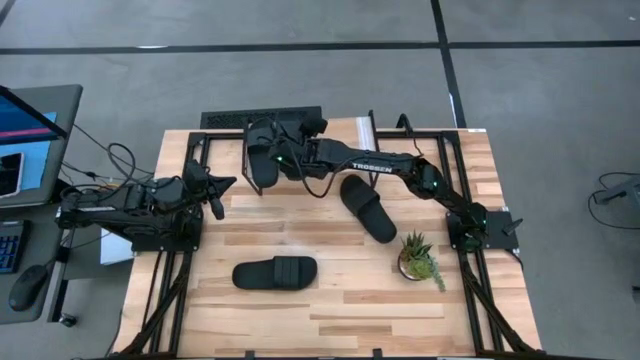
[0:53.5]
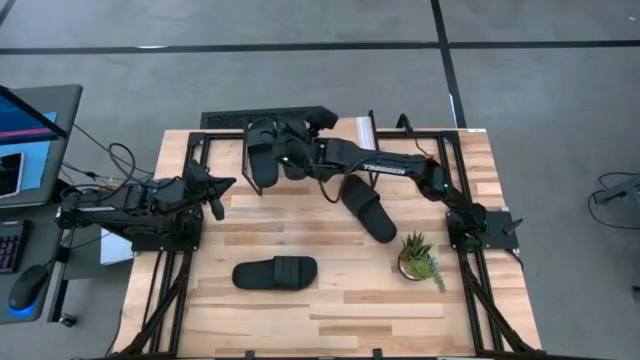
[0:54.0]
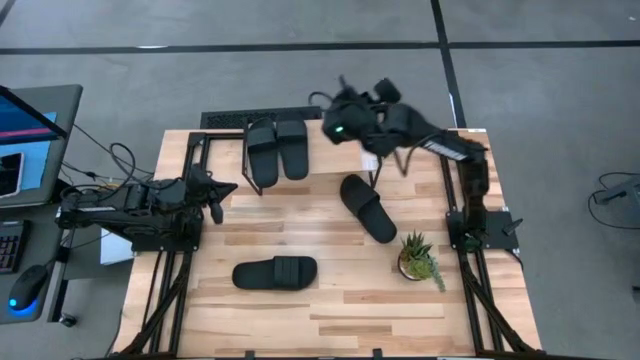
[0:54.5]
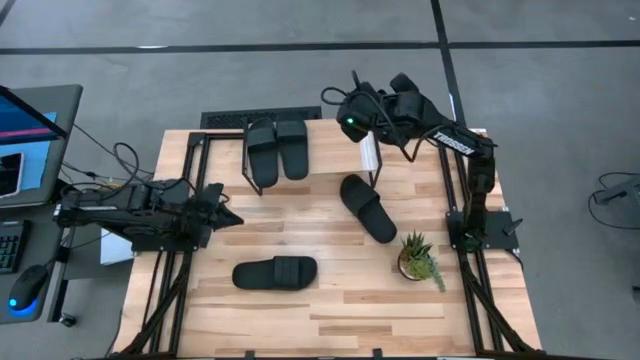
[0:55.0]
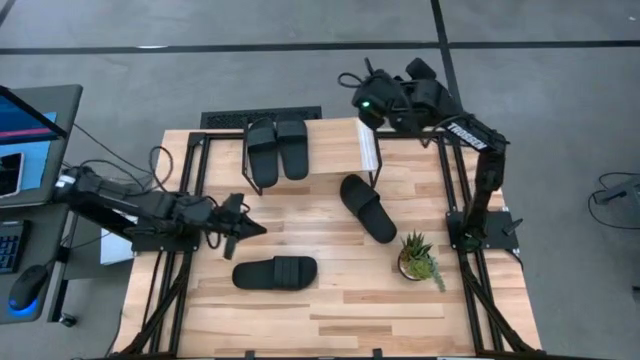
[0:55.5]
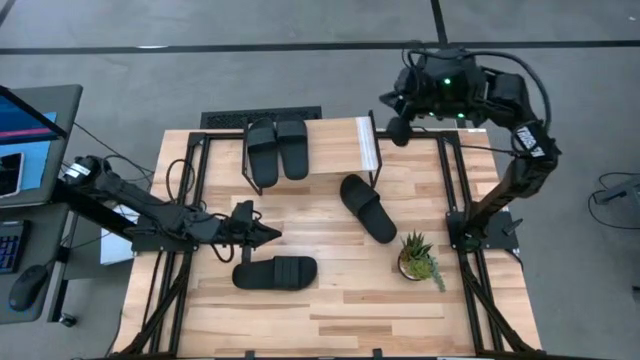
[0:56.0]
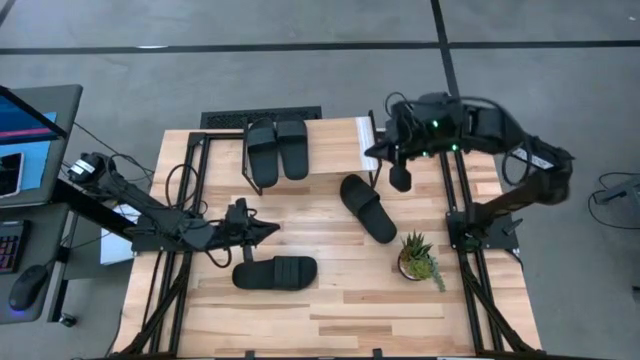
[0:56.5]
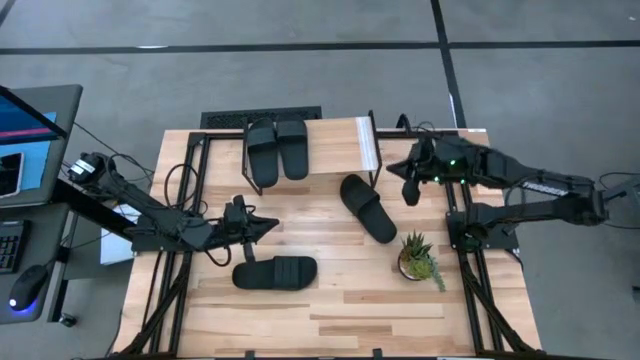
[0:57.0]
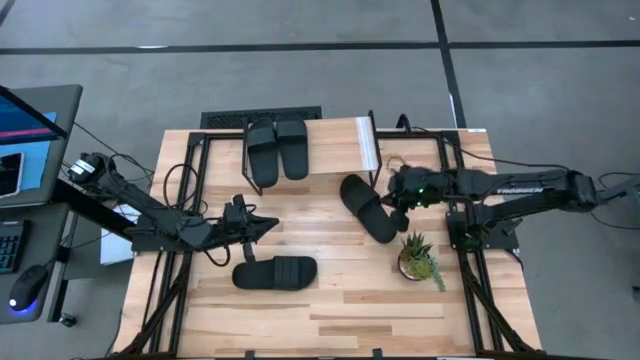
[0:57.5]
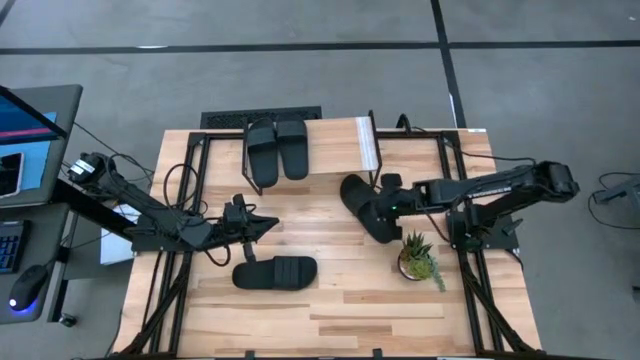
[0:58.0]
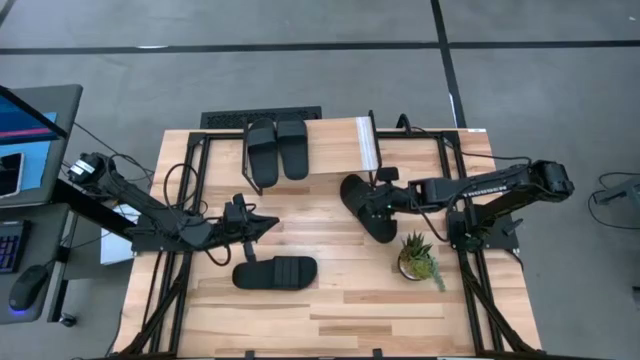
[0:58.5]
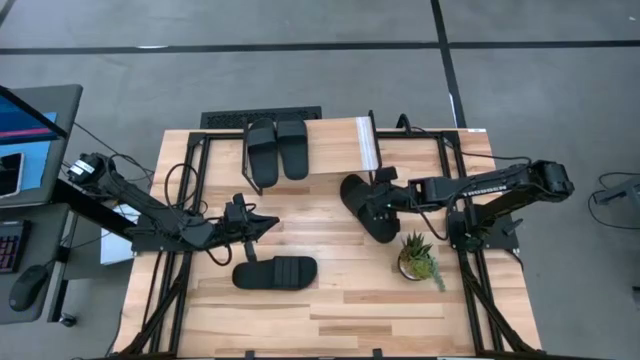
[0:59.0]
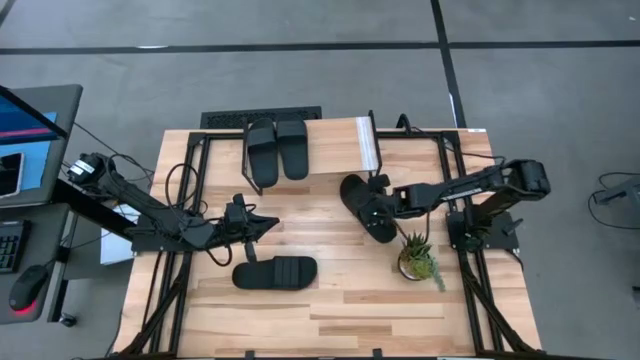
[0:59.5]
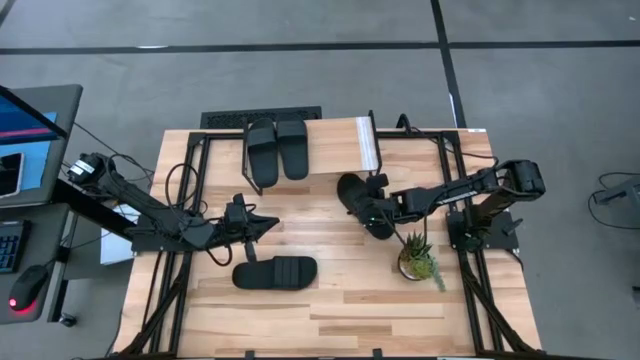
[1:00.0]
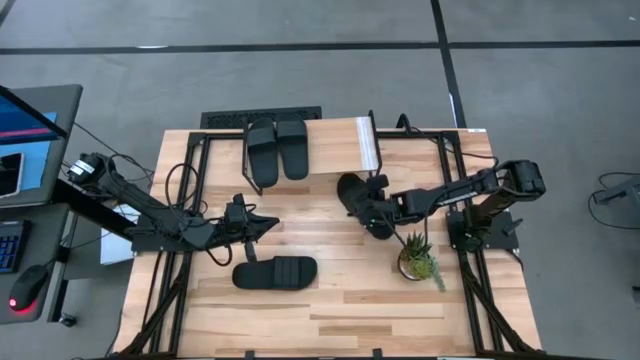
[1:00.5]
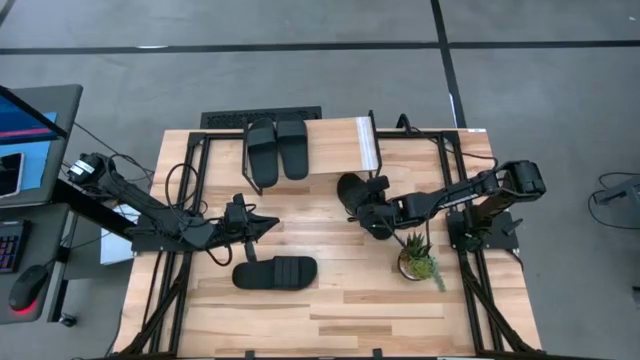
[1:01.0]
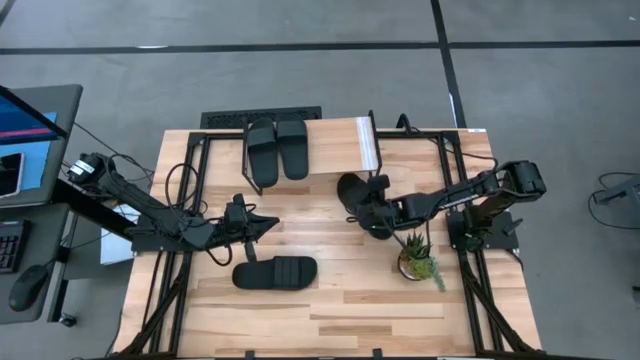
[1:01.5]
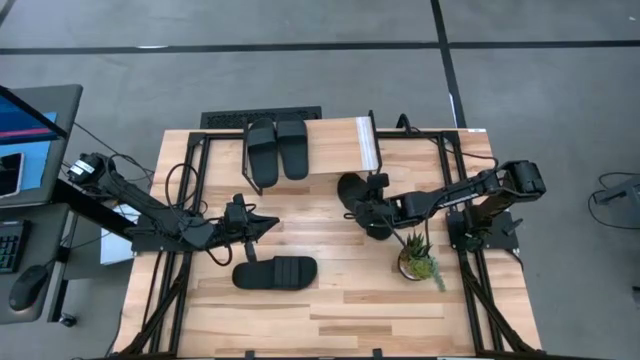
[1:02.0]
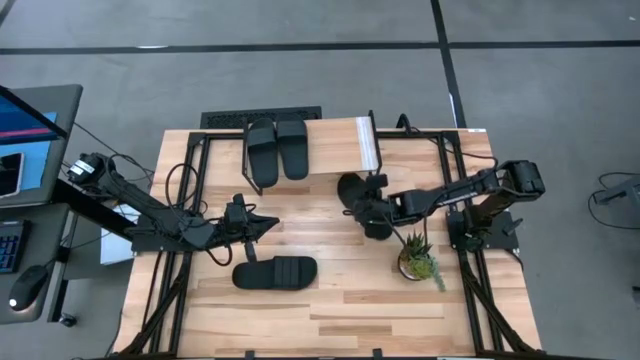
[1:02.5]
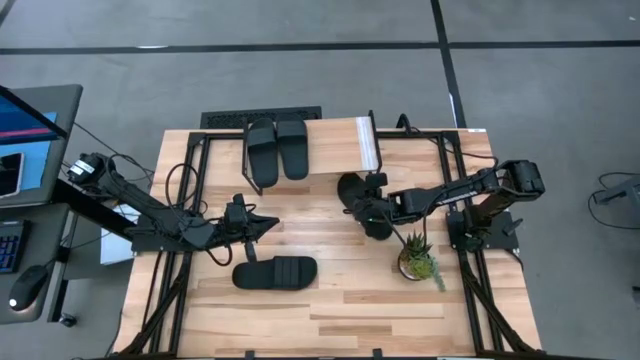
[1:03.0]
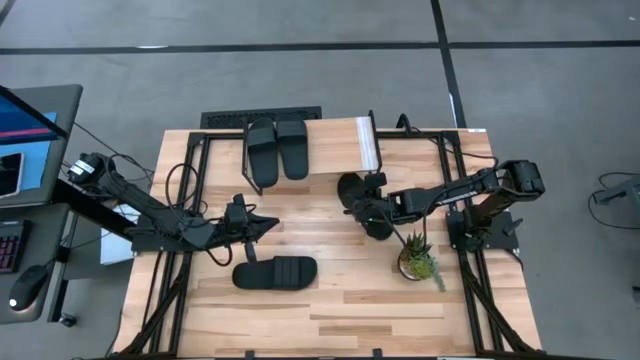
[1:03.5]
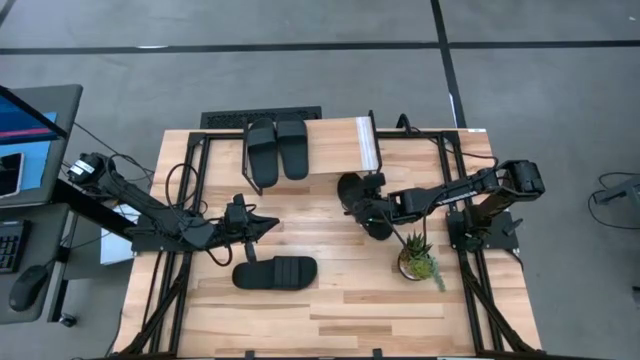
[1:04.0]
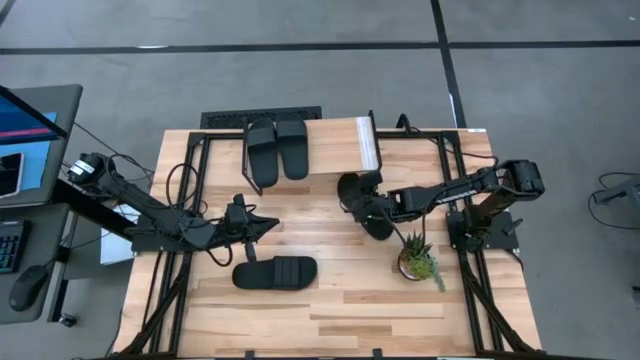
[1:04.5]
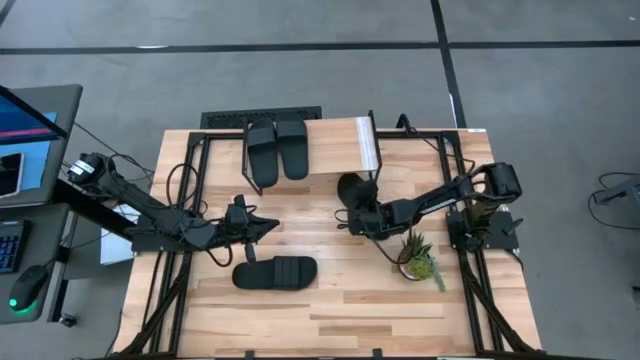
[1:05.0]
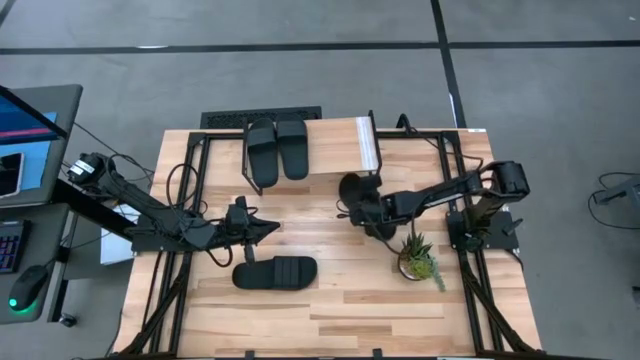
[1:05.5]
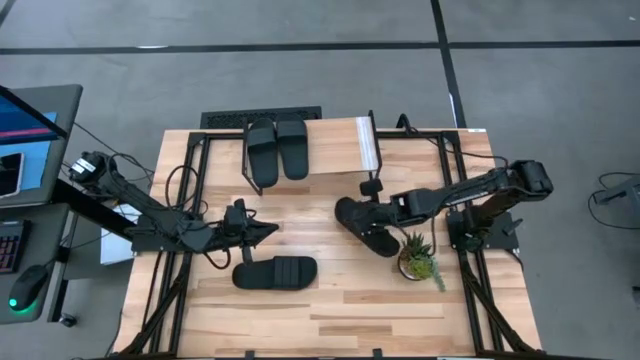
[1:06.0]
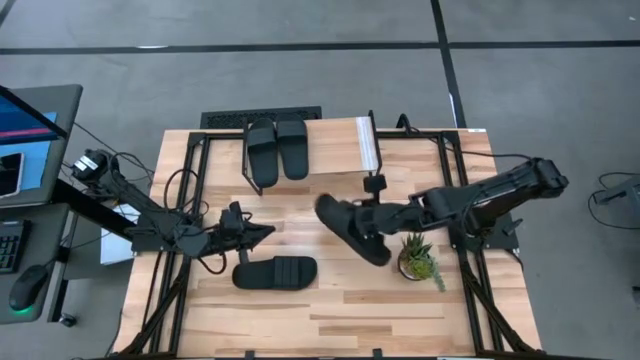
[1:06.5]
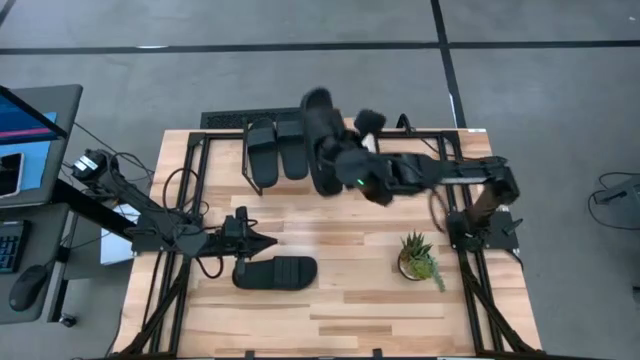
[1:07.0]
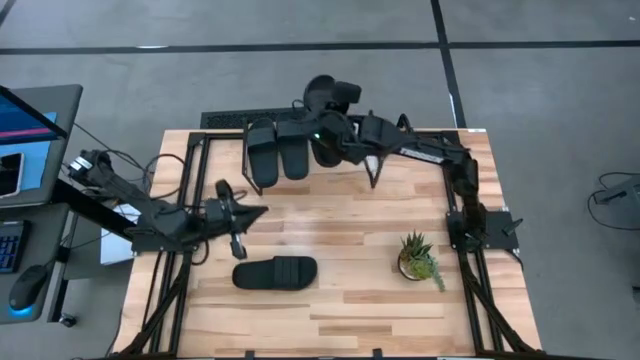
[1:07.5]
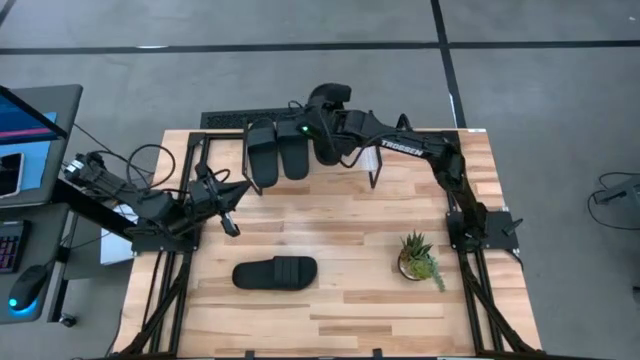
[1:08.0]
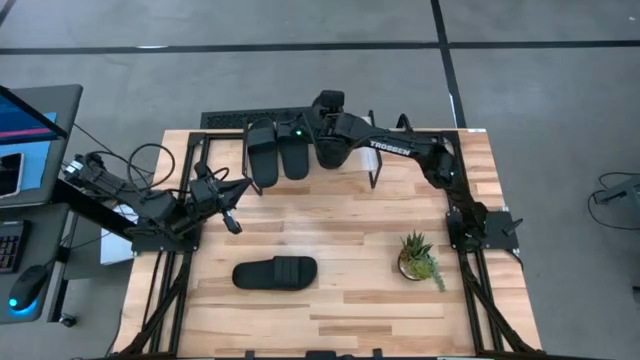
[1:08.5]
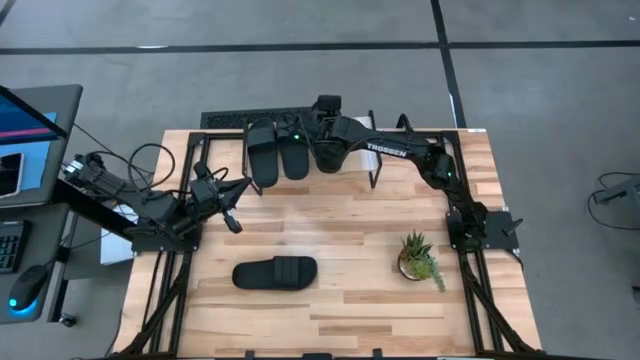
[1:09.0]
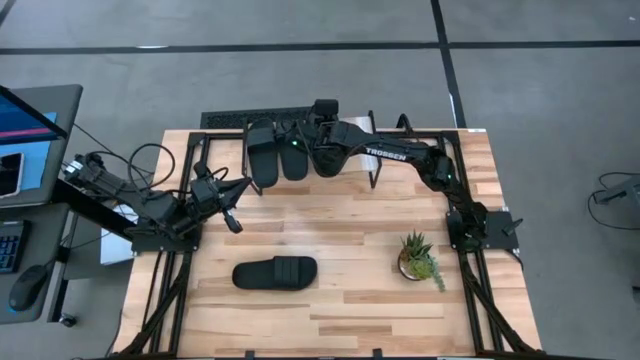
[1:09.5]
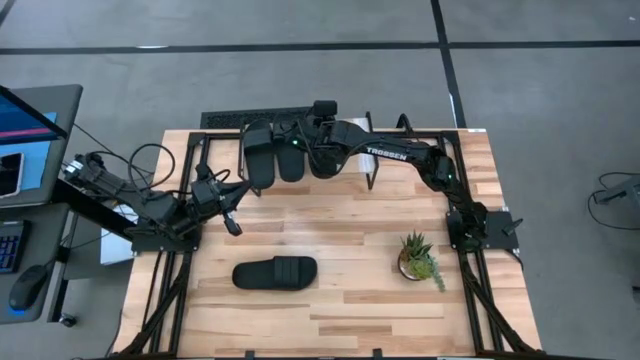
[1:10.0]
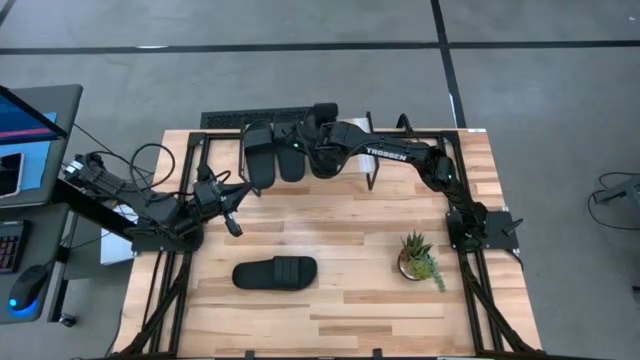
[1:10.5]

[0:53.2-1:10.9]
Task: Pick and place slides into the shelf
Put the black slipper on the shelf

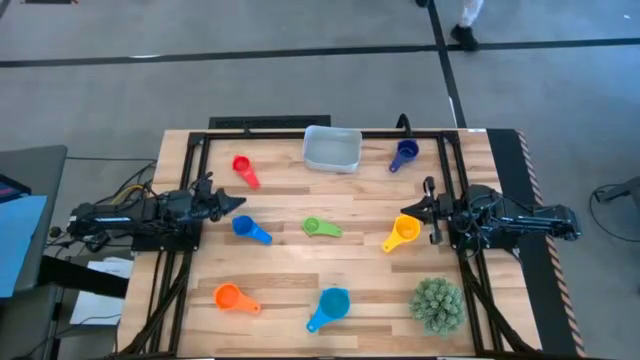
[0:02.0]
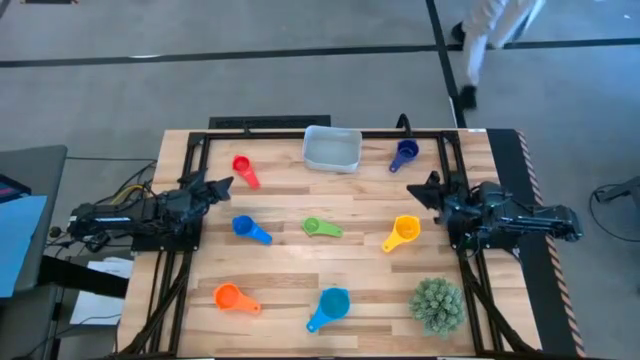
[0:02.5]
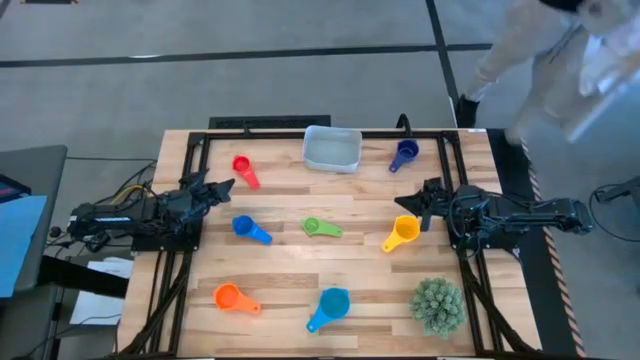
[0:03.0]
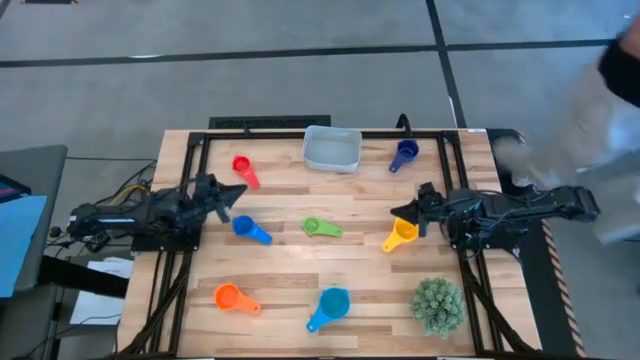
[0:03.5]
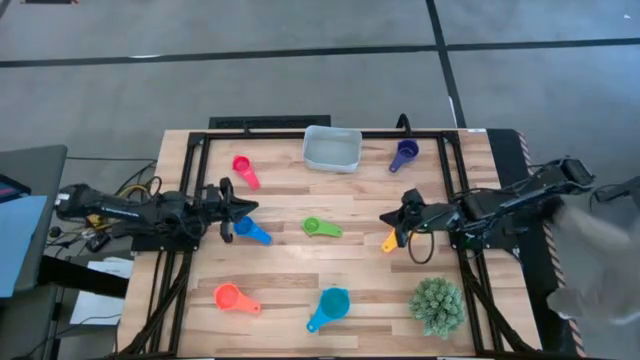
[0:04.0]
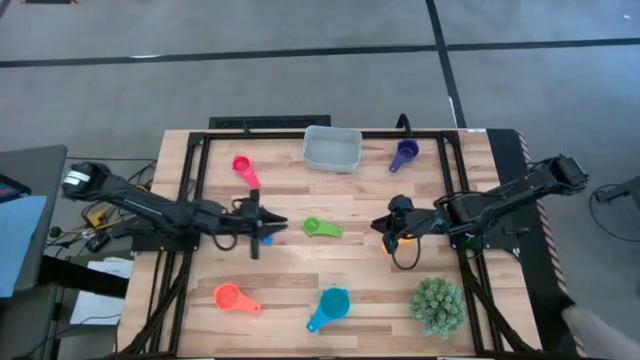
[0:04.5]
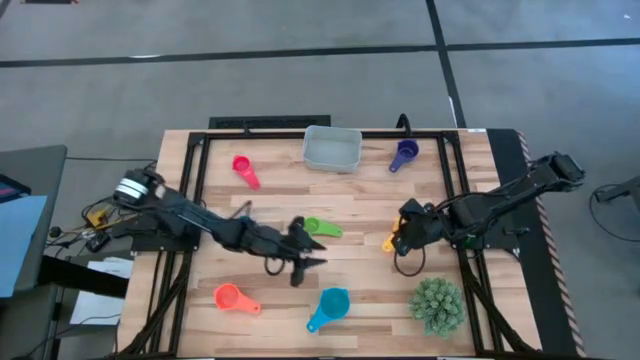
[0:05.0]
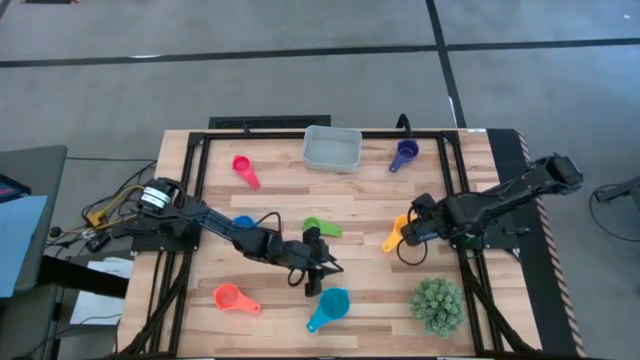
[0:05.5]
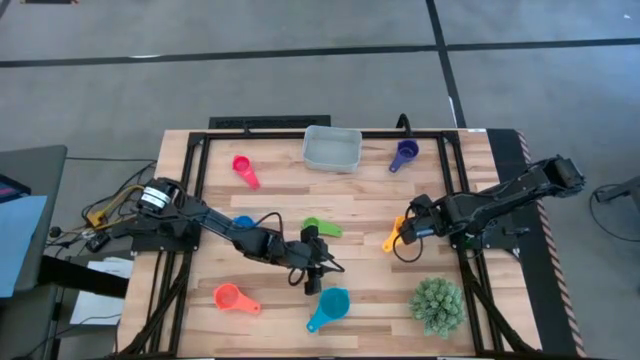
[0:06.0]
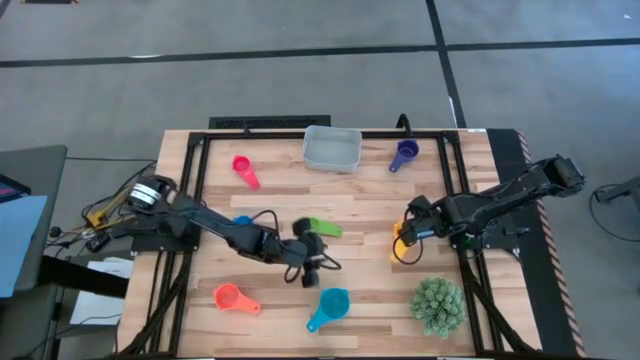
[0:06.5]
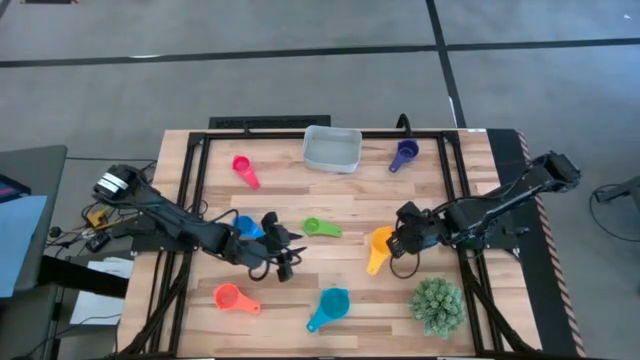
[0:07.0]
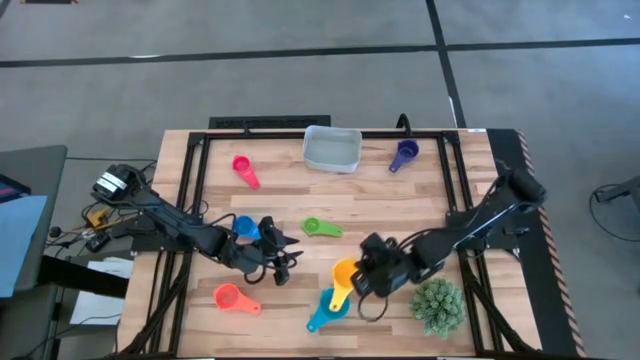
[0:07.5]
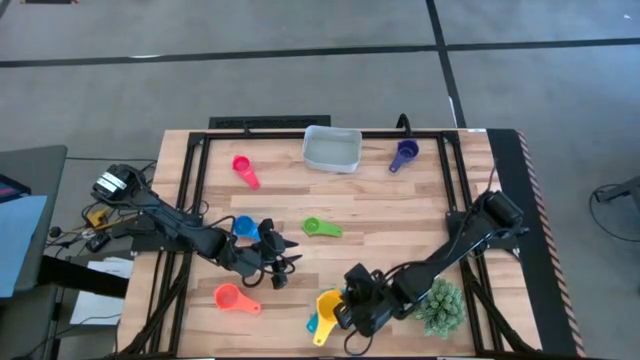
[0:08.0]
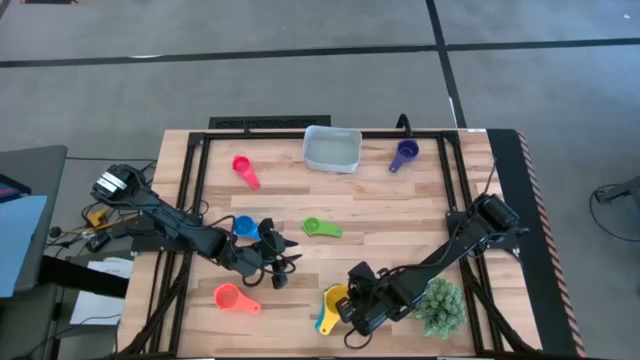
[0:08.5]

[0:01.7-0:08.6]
Task: Nest measuring cups in basket
Stack the yellow measuring cup on top of the light blue measuring cup
